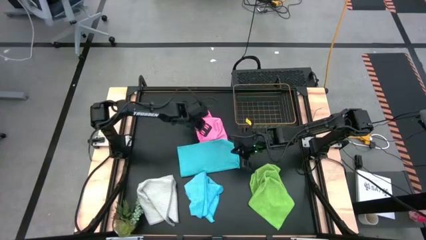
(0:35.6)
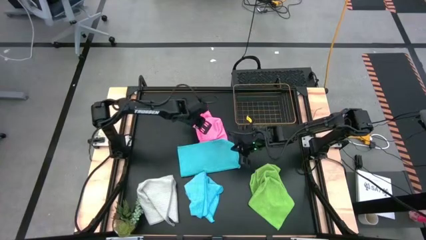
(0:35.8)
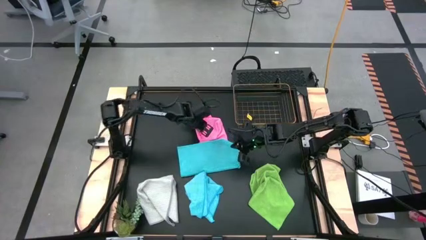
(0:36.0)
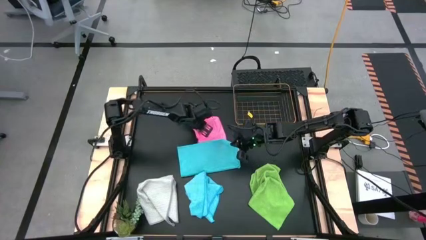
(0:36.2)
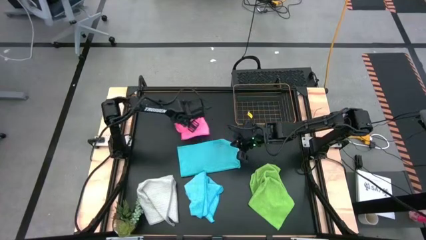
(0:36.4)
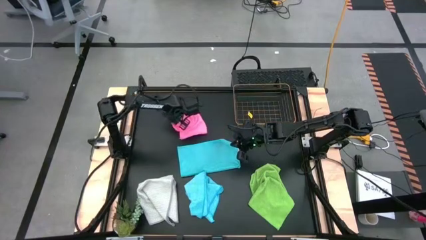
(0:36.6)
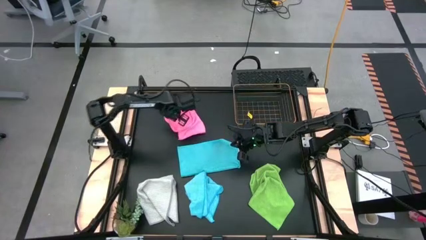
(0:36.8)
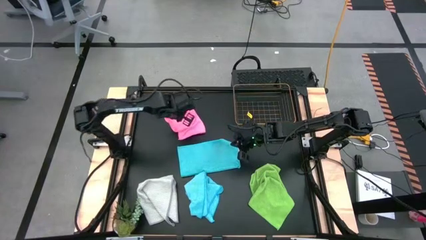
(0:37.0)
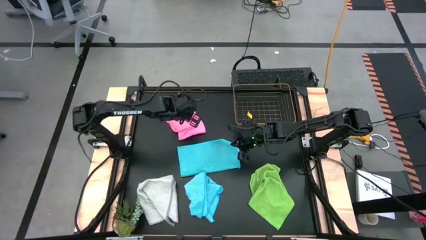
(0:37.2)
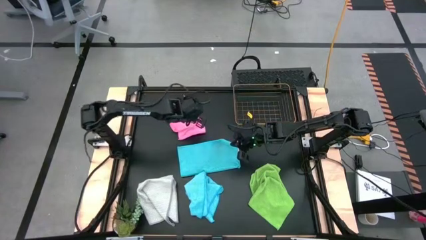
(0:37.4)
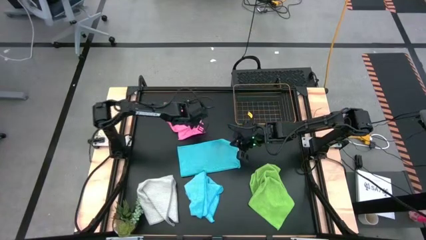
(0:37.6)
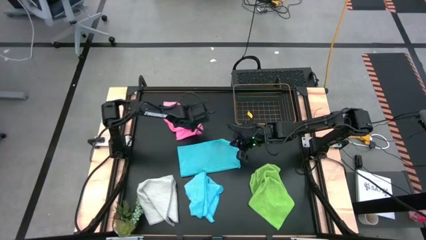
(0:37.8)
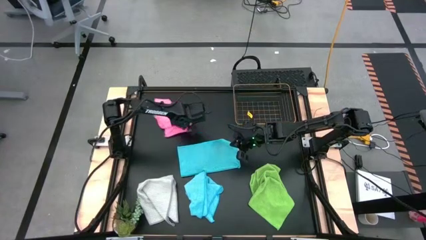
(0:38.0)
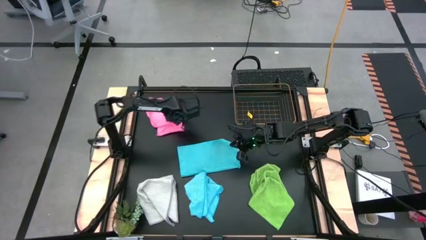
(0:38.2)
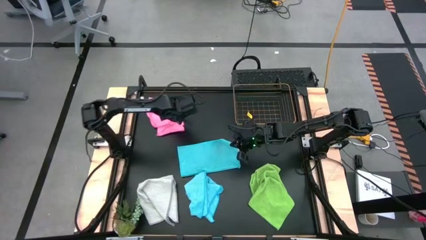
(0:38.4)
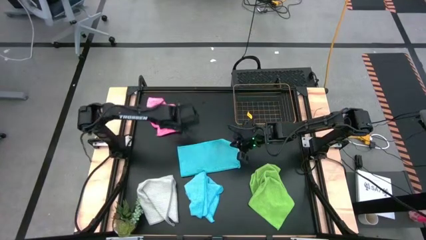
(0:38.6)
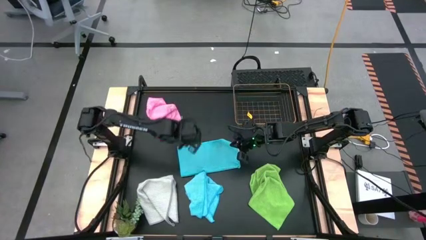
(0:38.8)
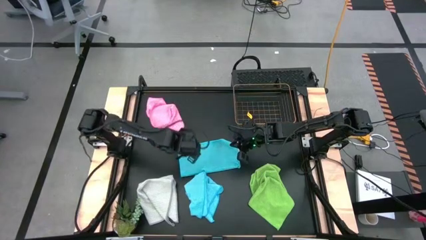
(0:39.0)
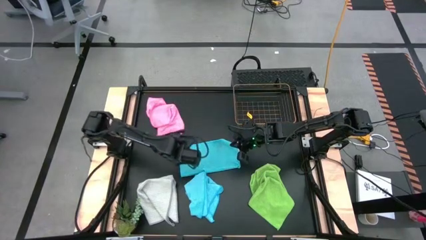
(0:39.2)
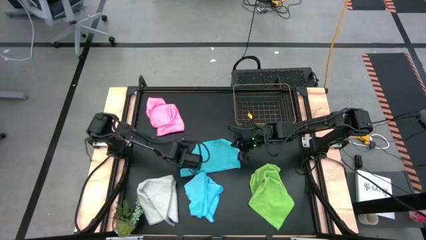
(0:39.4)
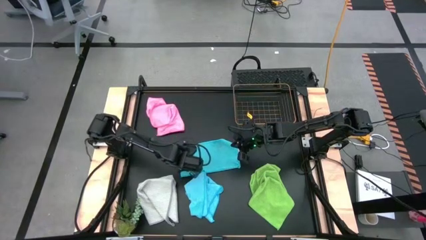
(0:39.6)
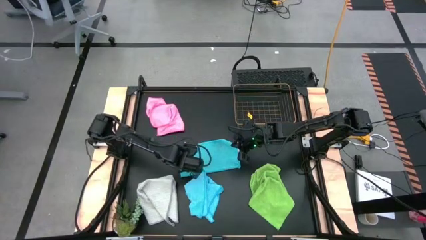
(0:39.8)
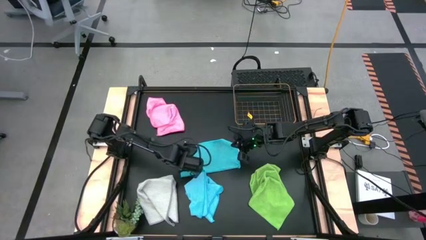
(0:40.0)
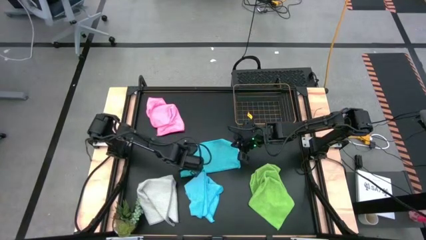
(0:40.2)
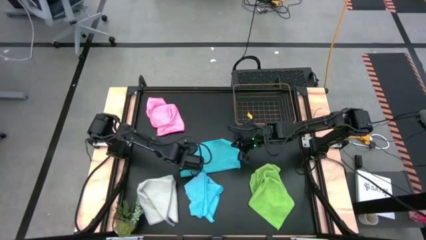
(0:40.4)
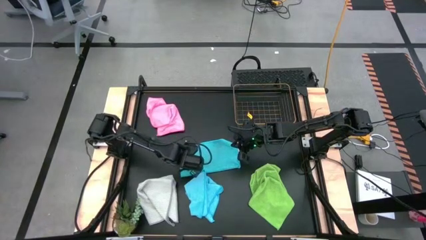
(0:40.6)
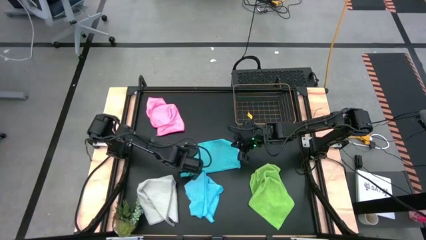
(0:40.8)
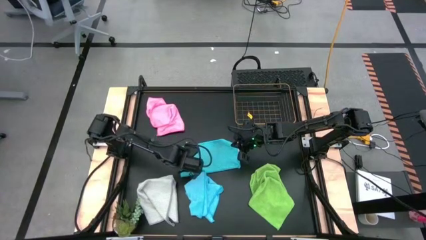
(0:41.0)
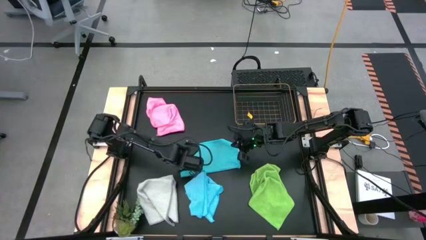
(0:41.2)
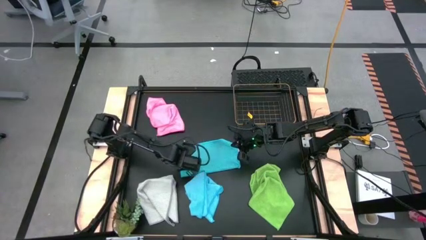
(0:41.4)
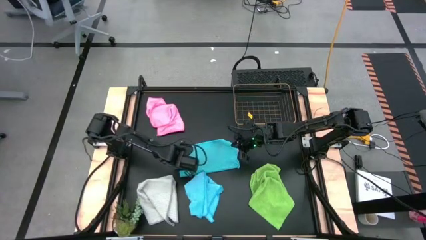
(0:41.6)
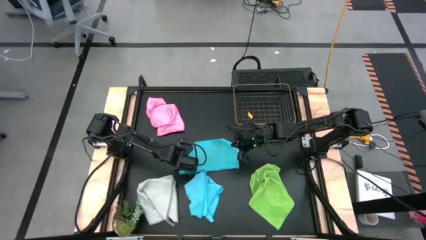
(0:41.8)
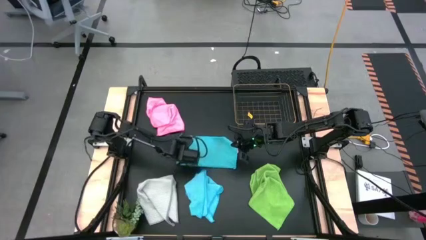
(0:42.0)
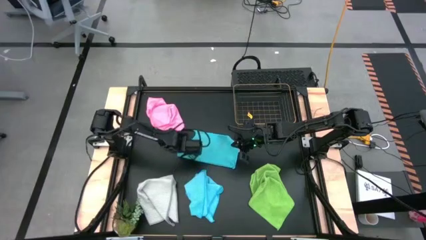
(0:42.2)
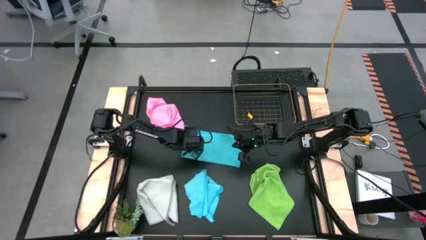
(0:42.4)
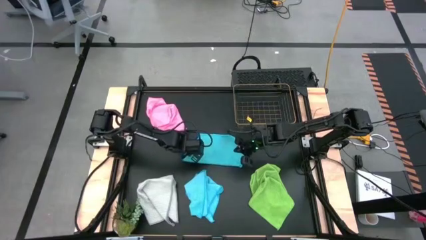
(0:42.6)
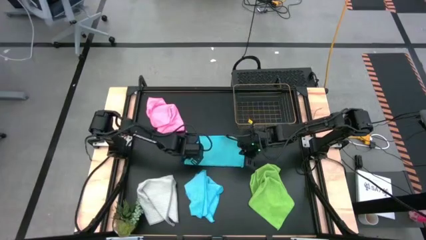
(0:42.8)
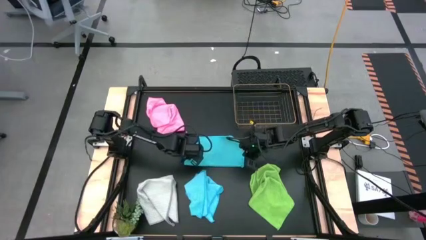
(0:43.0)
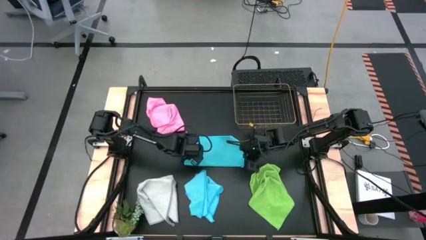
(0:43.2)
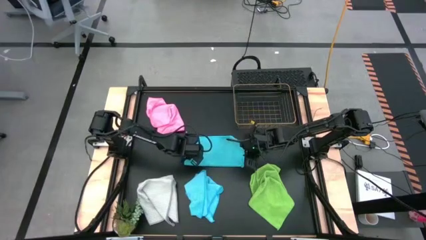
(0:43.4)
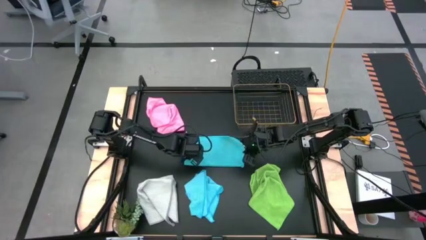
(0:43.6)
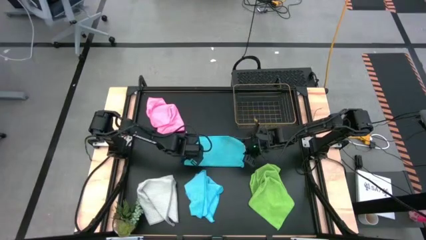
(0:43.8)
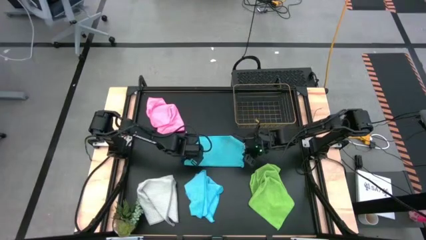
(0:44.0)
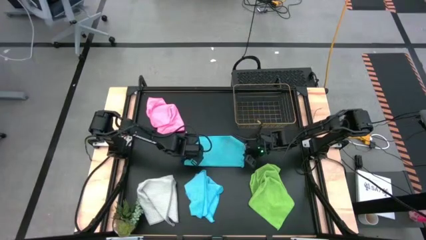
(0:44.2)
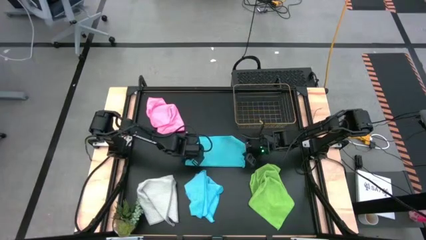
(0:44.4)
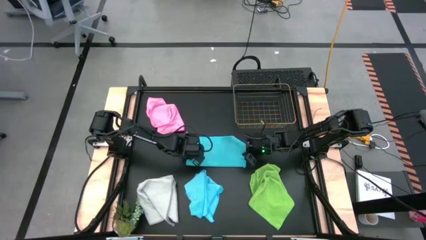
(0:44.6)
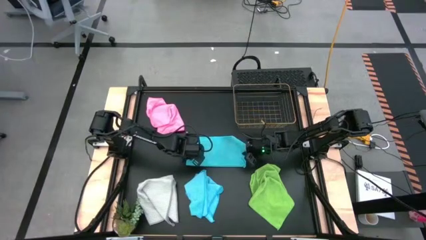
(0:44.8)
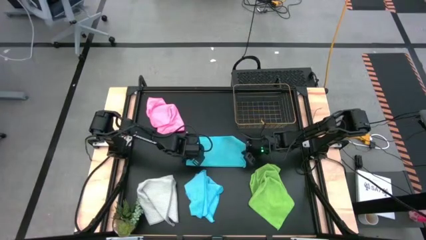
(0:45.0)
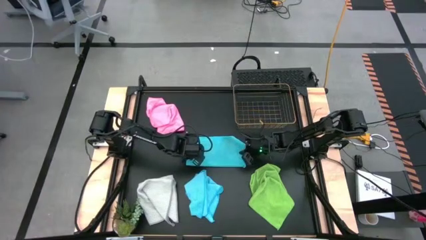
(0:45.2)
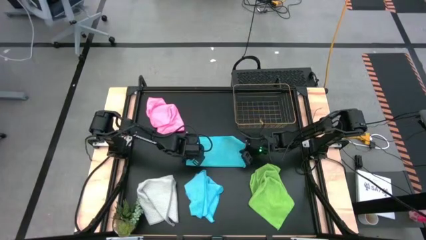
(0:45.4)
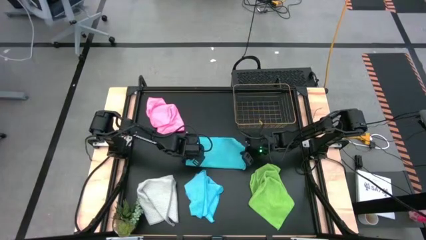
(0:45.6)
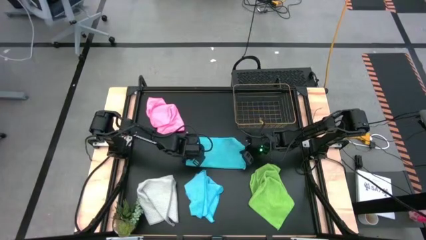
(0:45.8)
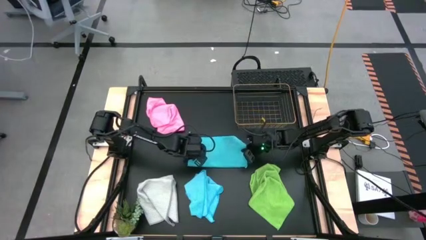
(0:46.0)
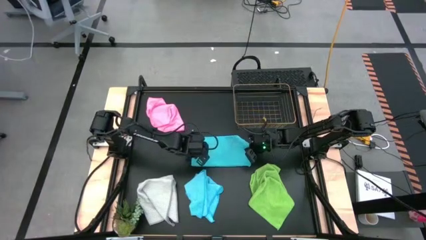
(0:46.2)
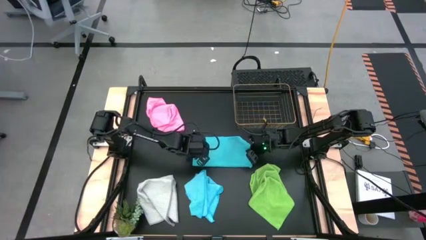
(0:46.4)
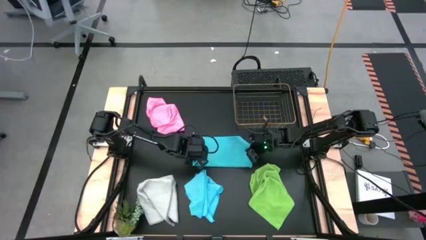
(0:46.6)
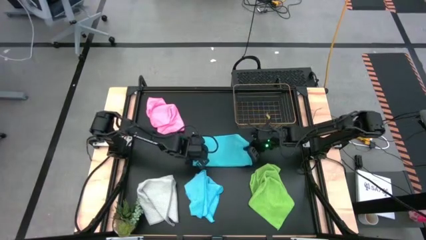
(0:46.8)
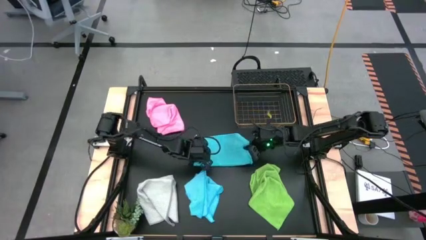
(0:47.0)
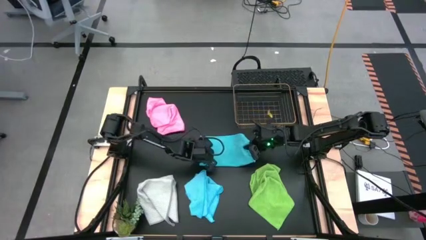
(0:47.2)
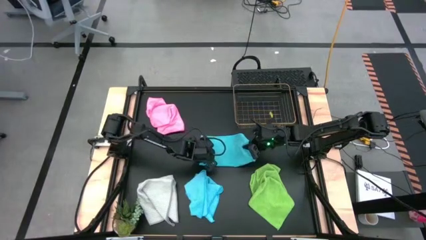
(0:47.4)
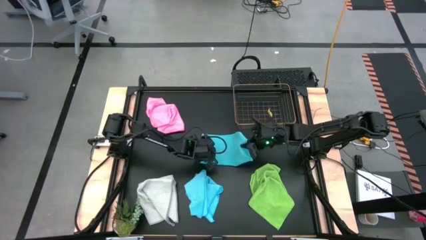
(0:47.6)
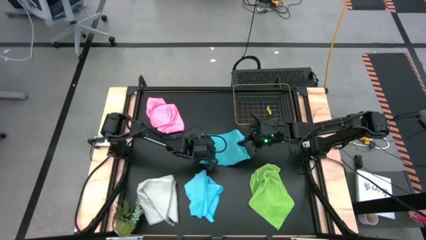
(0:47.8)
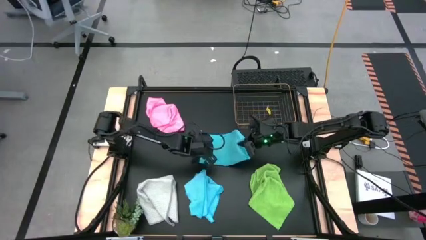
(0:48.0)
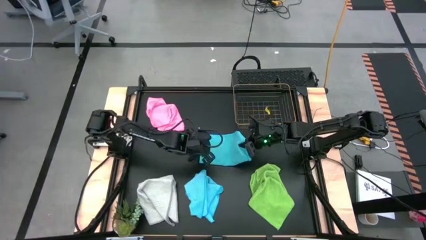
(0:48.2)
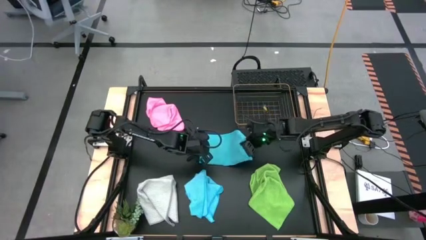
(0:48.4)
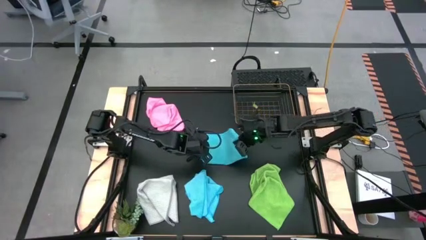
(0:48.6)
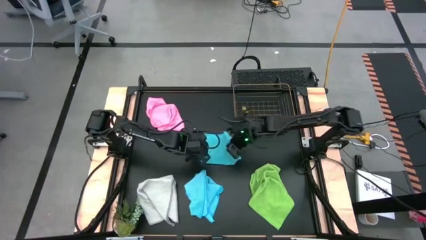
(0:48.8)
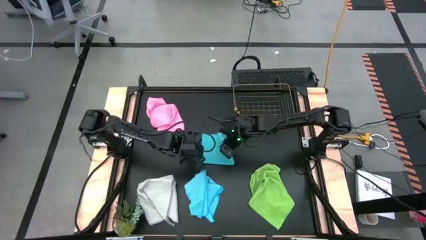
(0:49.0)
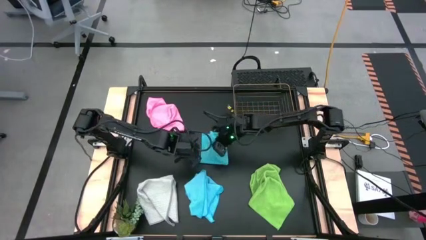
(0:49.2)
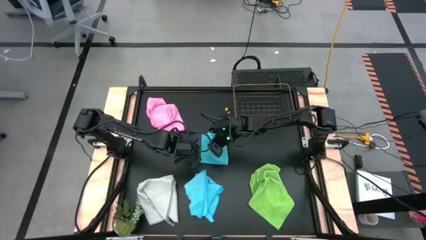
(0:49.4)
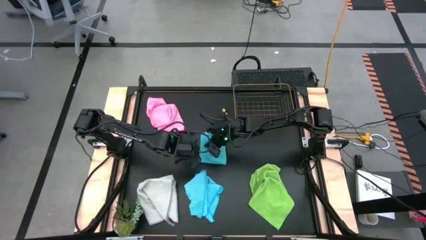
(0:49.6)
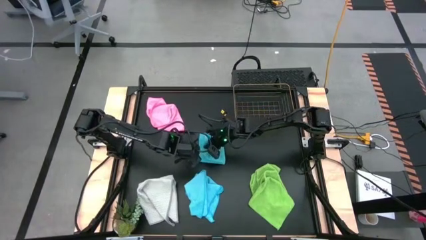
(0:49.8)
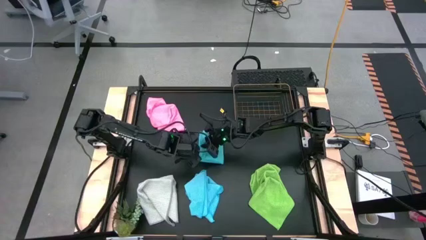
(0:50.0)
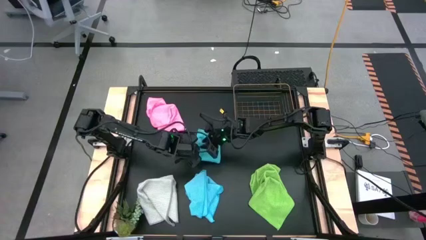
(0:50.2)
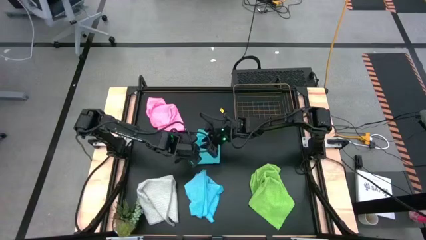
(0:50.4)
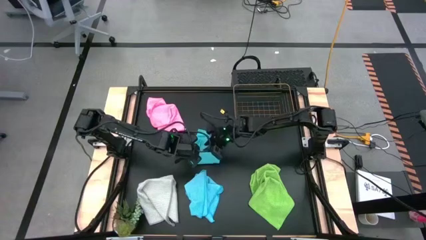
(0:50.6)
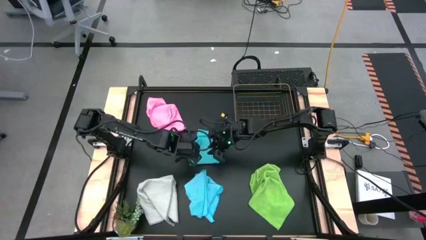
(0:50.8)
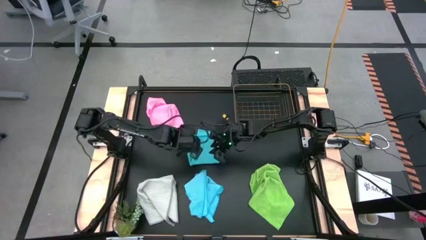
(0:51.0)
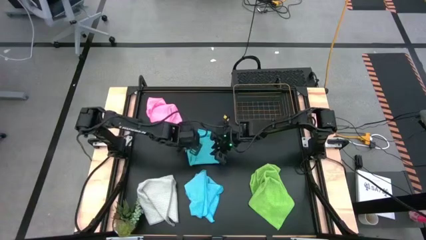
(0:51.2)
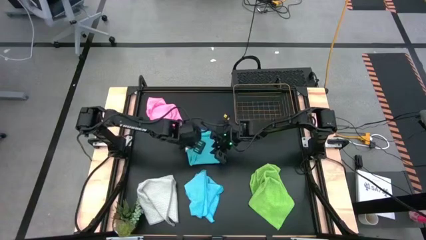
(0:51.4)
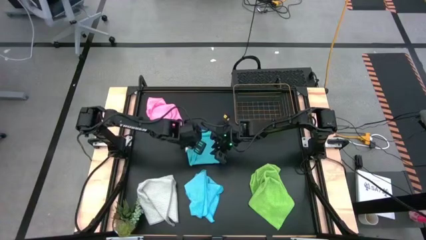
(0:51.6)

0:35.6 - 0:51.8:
Task: Fold microfiber towels
Fold the top blue towel
